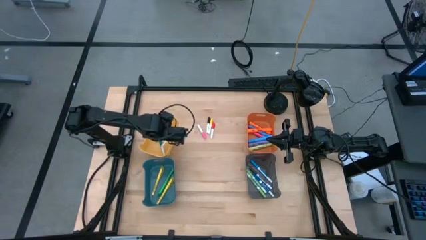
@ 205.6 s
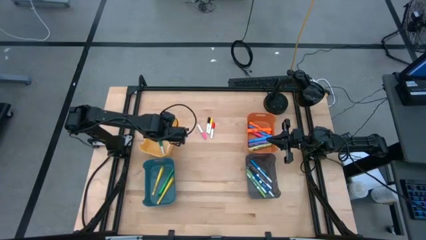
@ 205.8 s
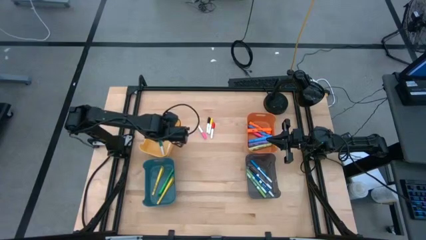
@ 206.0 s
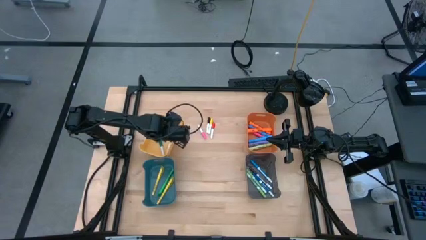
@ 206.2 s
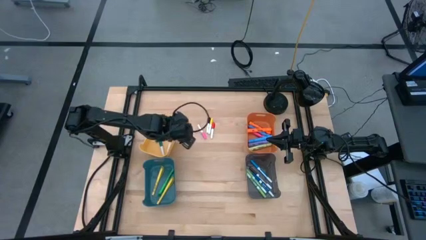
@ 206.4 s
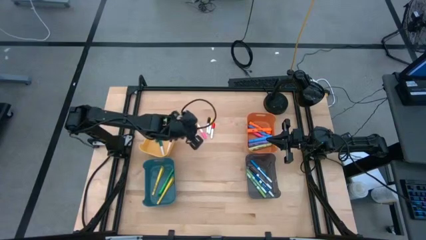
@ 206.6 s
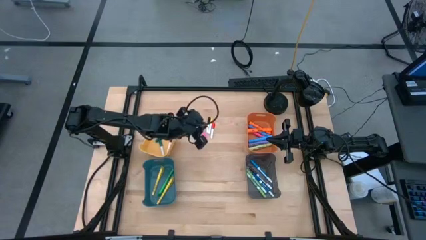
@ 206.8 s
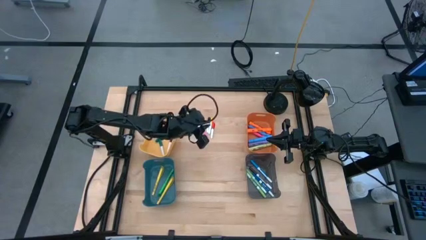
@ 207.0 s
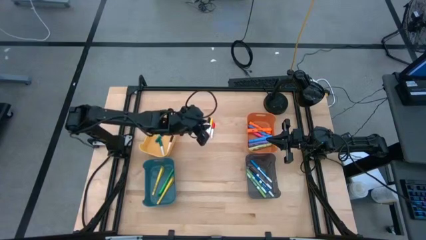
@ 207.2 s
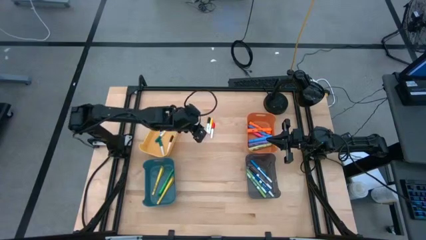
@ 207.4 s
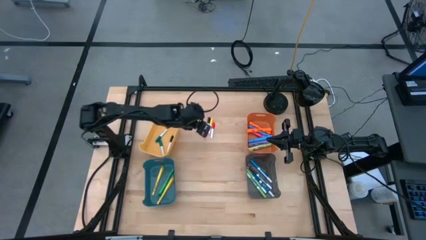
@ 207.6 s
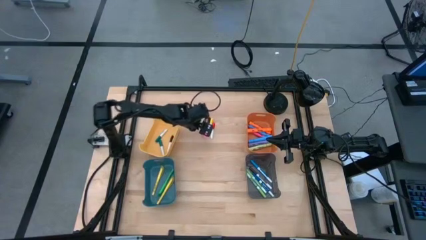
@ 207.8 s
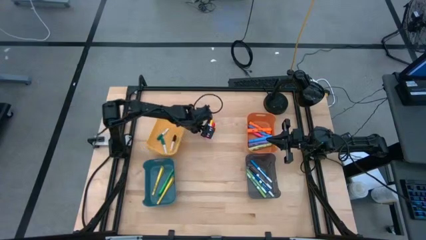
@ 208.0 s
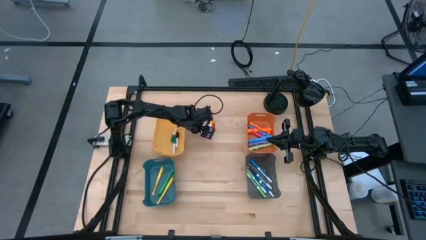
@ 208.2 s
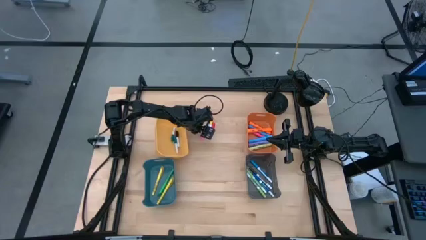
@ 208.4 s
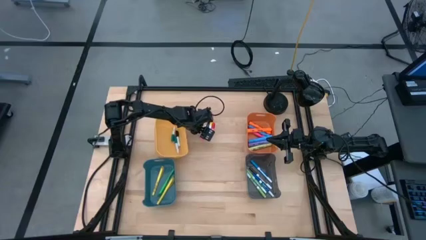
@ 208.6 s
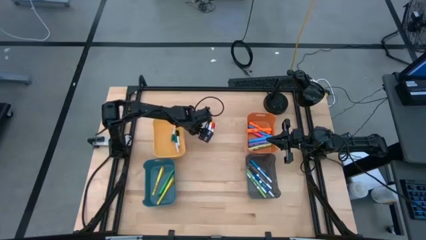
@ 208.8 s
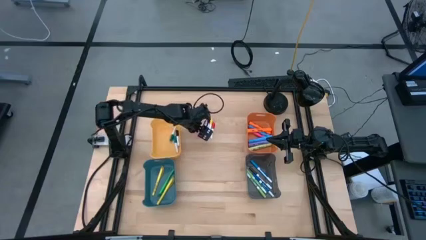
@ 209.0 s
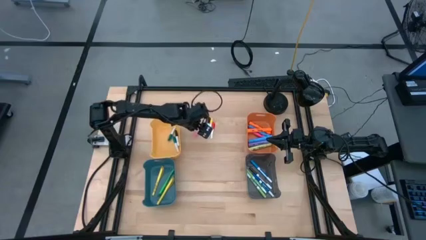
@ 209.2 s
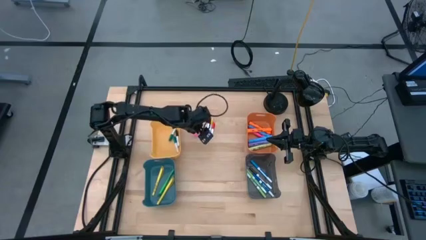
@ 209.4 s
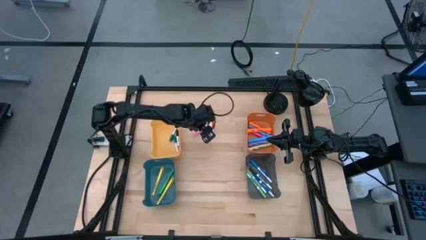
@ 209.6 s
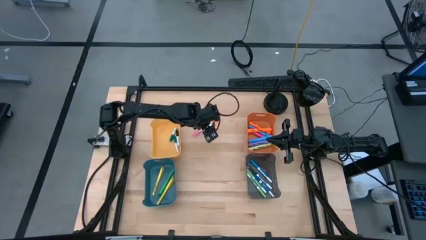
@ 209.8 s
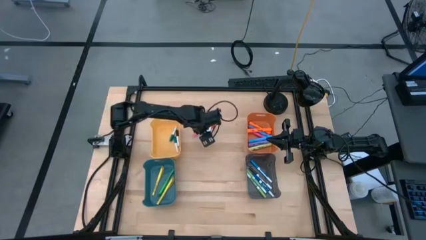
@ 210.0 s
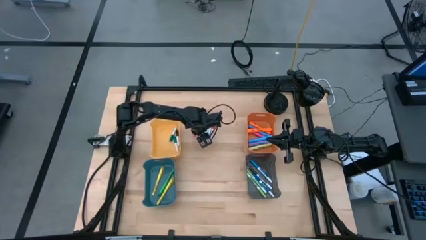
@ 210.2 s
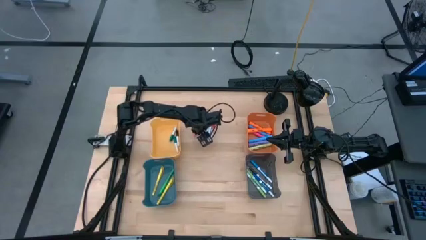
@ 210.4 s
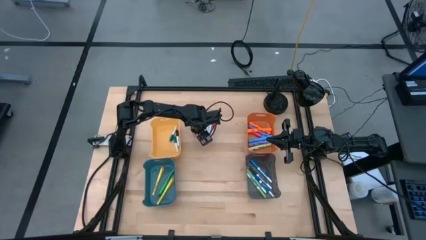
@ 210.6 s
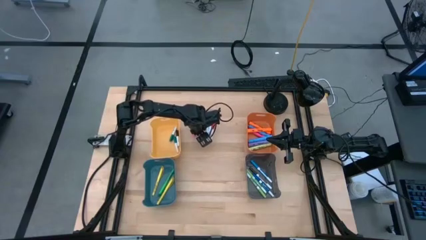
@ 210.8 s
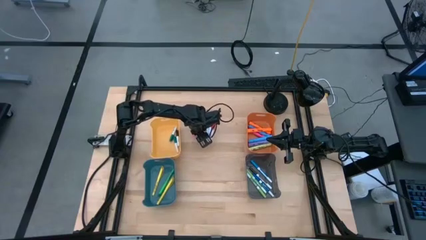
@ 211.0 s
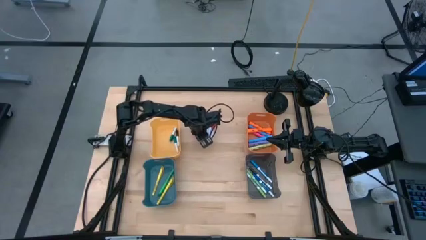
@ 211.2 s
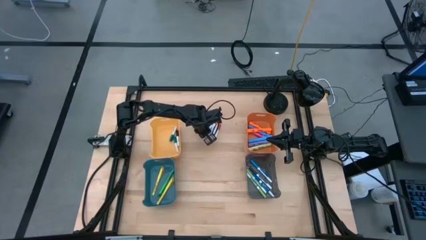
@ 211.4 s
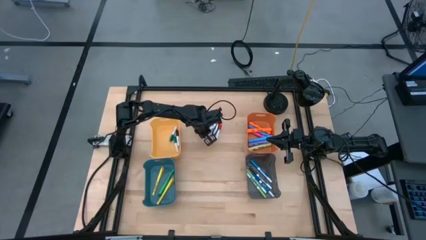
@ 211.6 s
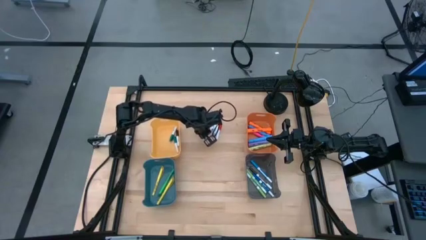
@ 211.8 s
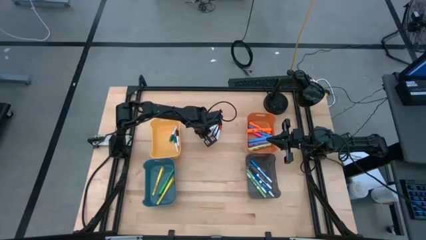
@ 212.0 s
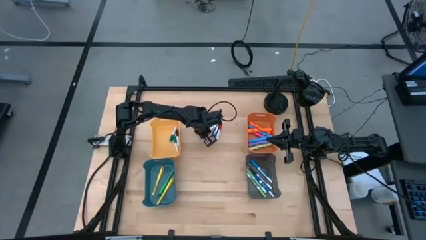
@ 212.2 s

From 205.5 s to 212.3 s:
Task: Pick & Place Markers
Put the pink mini marker into the yellow bin

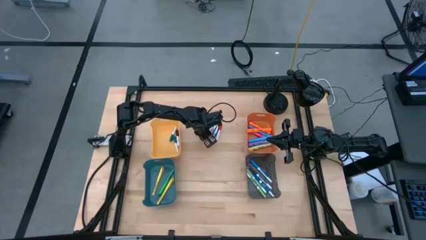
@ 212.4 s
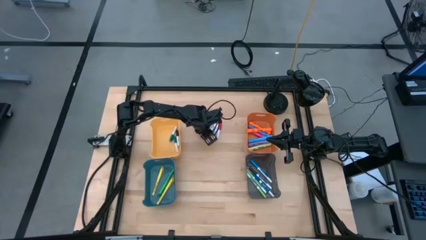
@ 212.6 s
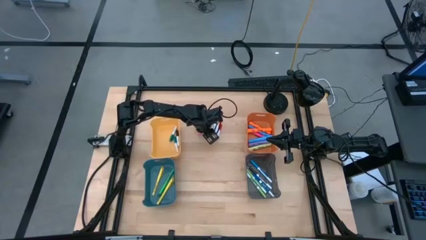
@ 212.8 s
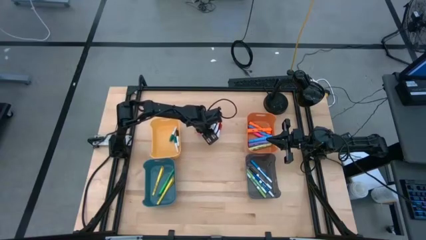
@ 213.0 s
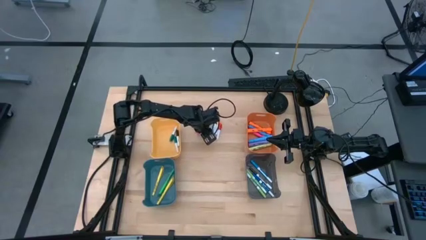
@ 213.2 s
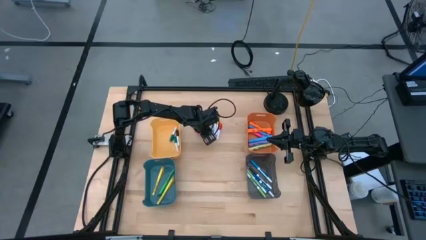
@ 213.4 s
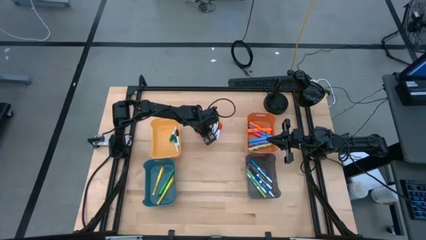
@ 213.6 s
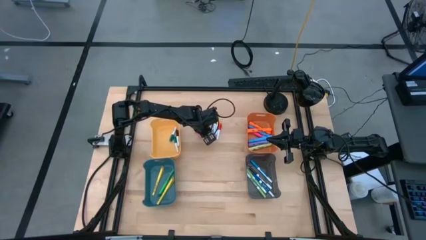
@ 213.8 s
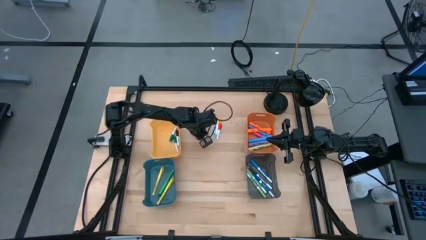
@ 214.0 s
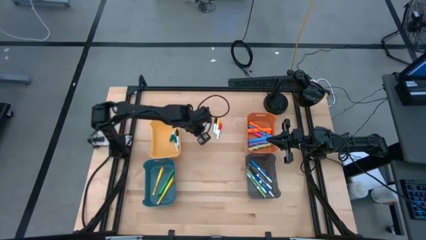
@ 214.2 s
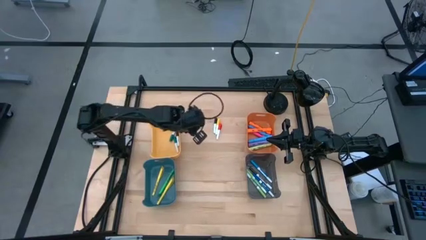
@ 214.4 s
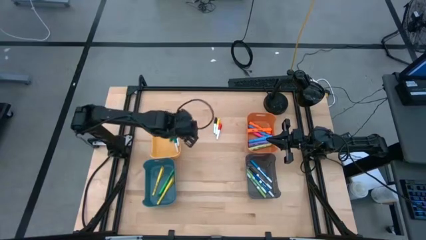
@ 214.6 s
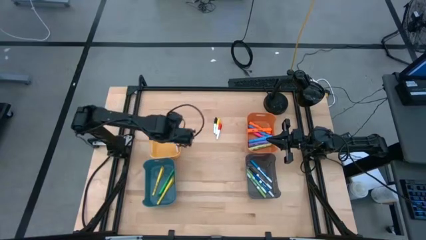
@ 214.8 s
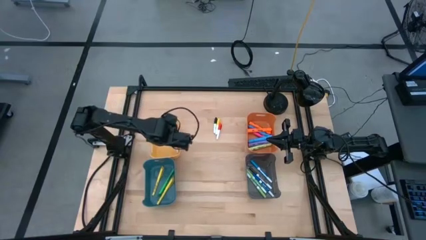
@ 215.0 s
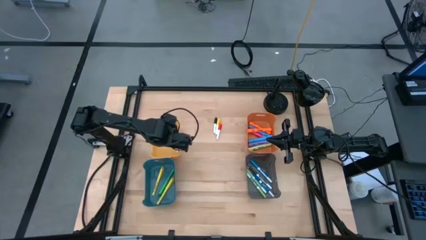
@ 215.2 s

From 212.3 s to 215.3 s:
Put the pink mini marker into the yellow bin

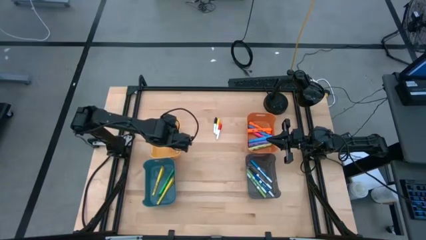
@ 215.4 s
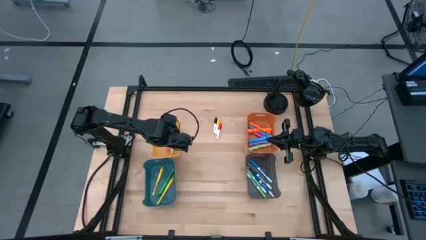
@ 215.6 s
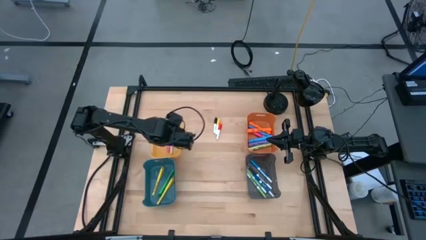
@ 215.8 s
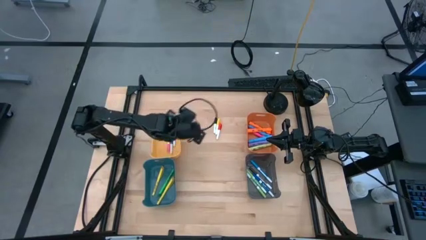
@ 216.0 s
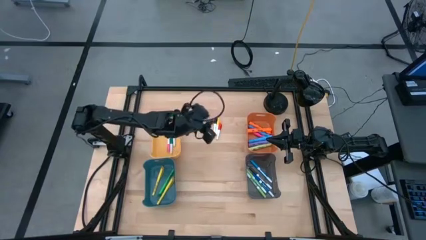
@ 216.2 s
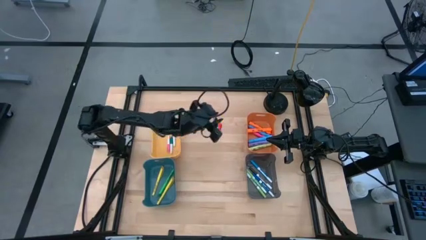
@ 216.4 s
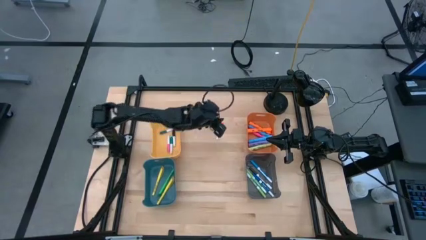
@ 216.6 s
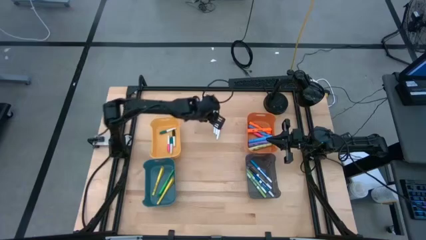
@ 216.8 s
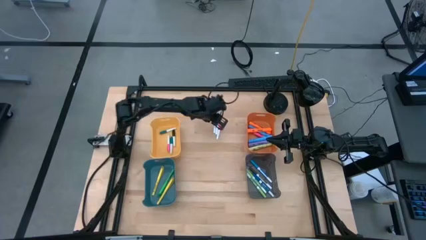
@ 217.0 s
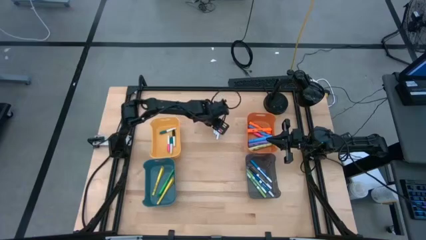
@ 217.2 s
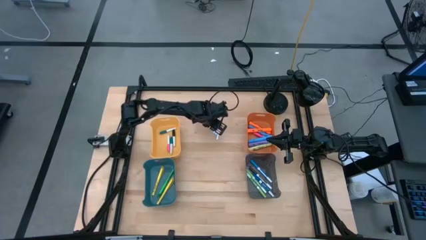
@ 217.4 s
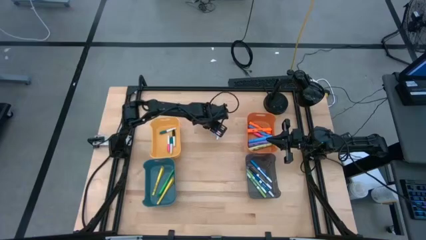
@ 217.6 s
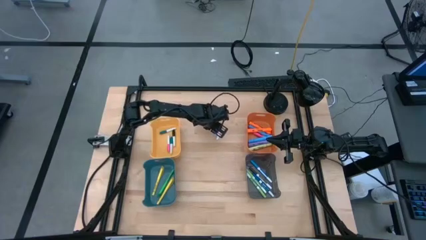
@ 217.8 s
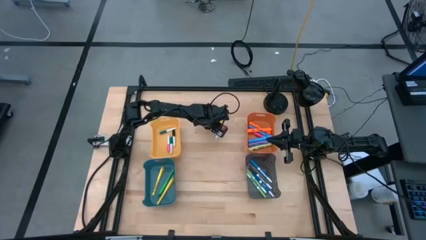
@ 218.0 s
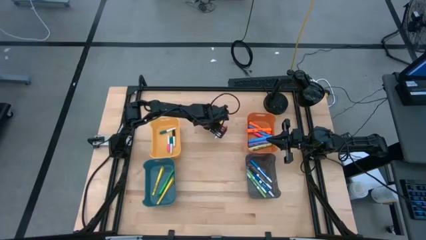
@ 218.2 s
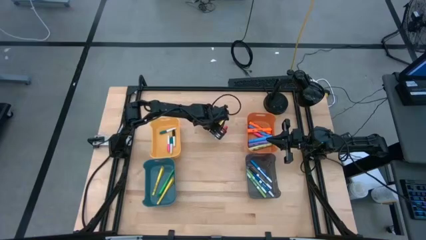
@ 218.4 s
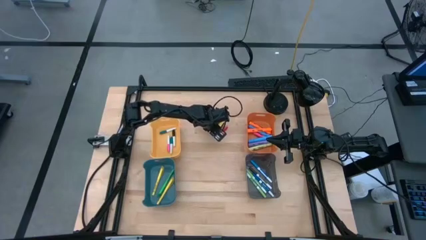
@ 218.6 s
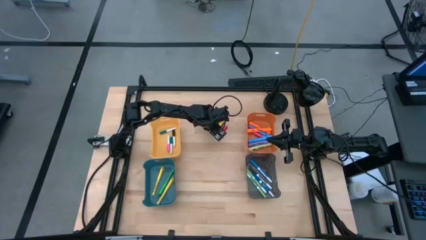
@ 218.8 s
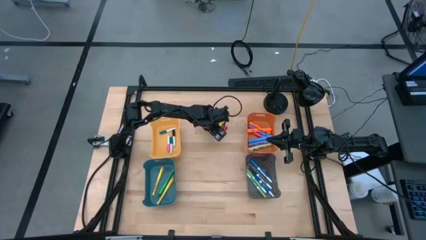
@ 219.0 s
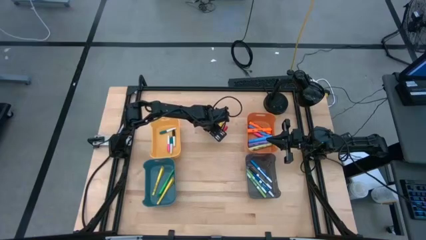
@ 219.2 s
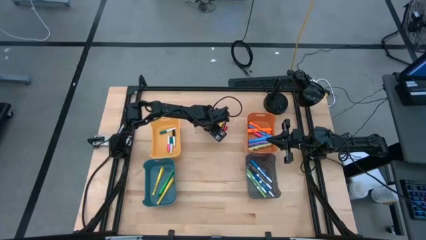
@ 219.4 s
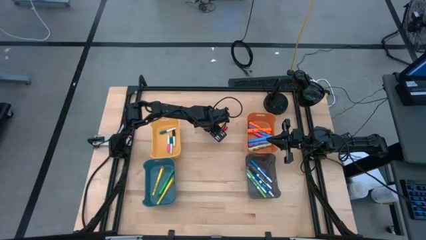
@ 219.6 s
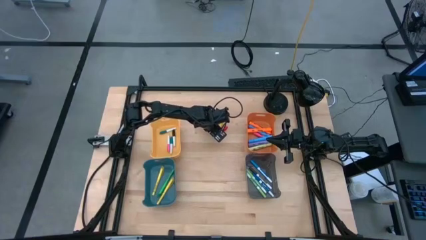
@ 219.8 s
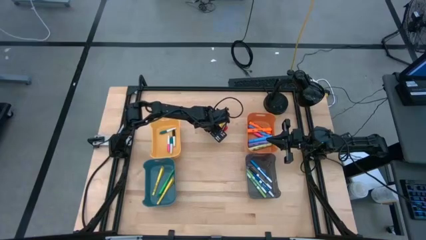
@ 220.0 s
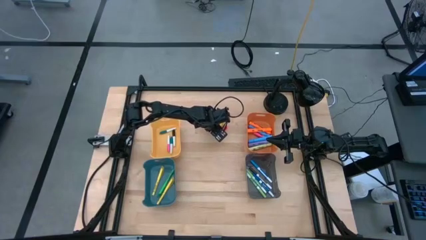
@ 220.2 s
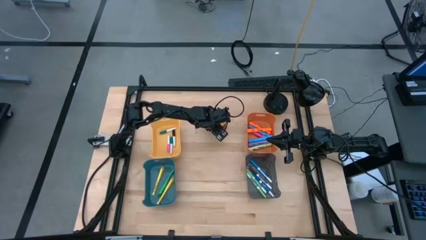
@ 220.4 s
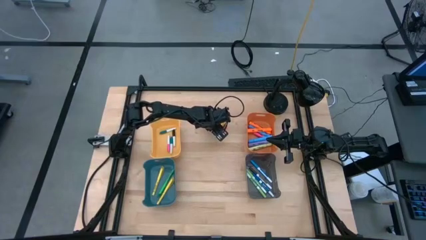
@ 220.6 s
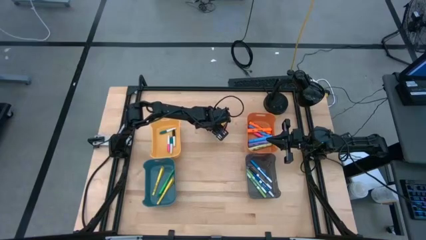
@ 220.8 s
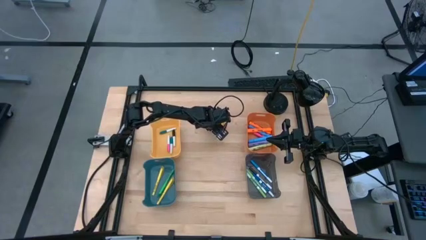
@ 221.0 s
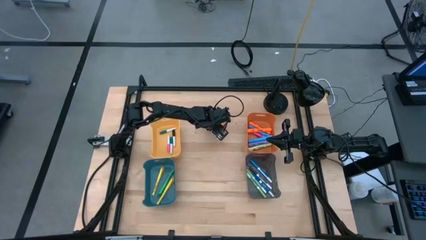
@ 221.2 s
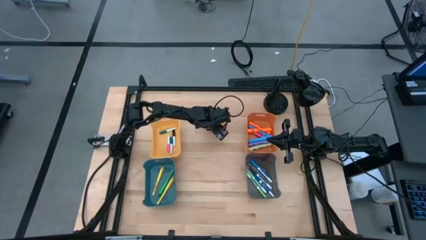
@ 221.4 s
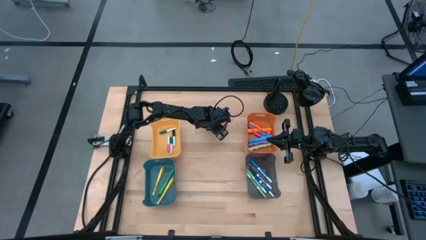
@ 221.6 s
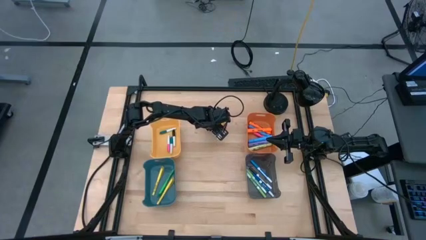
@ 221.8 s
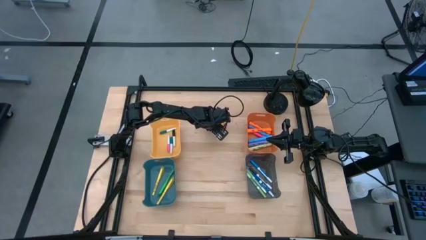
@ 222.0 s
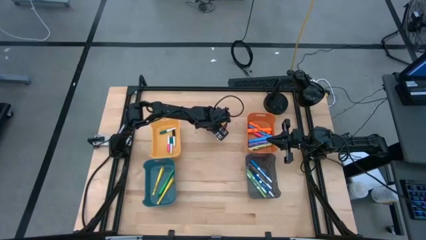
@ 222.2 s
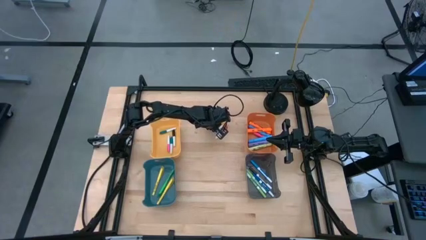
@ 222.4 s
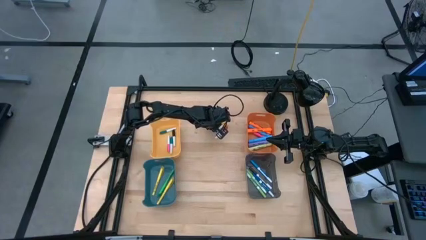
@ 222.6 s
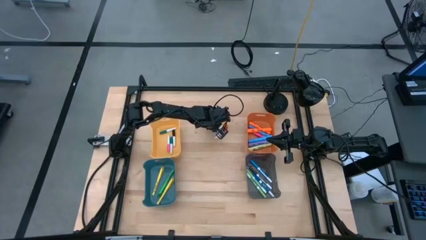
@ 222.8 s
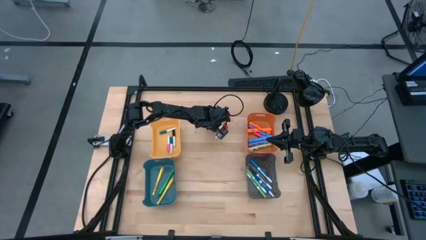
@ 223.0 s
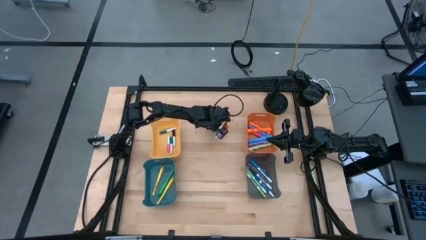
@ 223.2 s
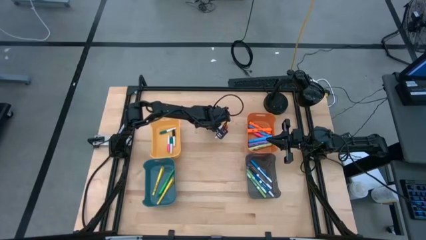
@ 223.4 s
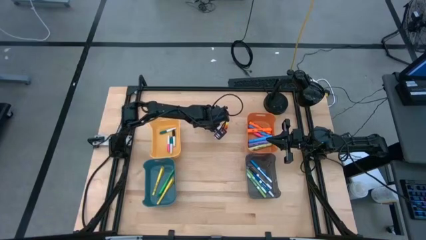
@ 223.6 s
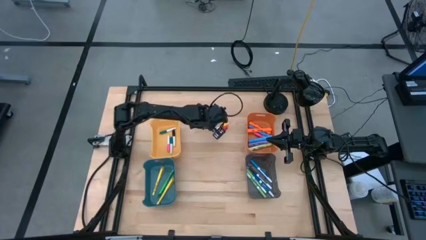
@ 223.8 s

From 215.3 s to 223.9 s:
Put the black mini marker into the yellow bin
